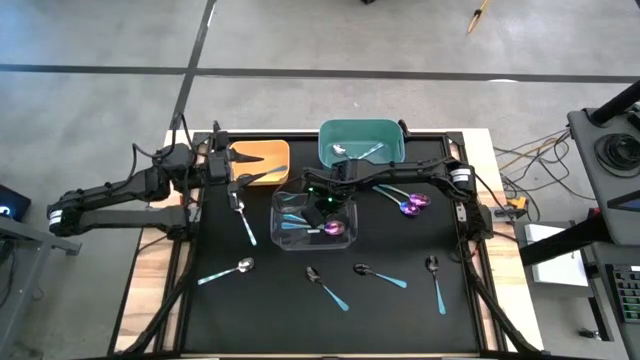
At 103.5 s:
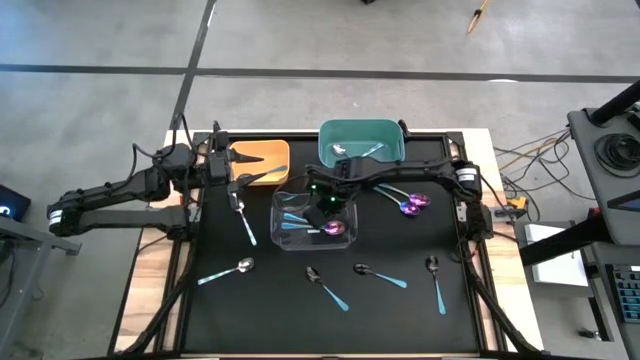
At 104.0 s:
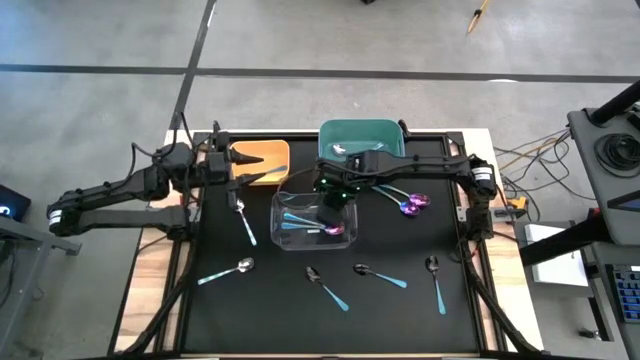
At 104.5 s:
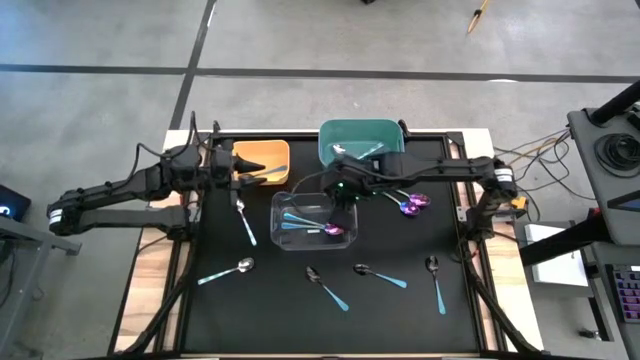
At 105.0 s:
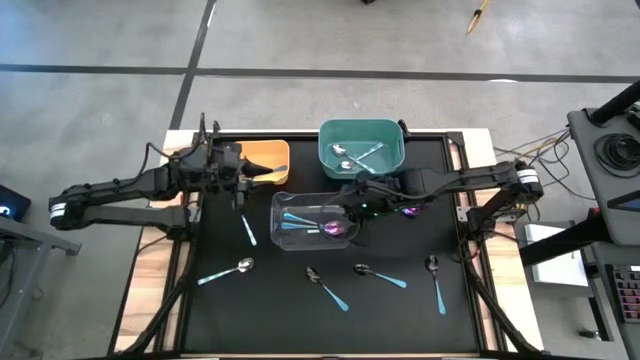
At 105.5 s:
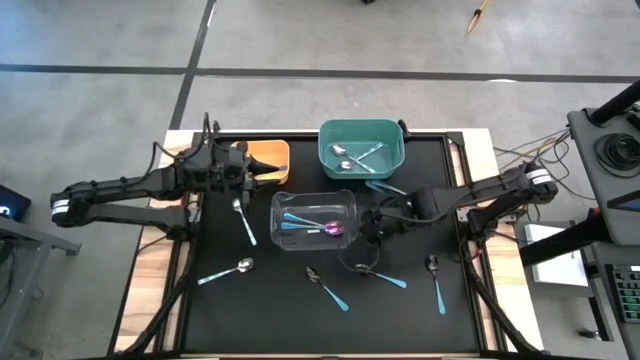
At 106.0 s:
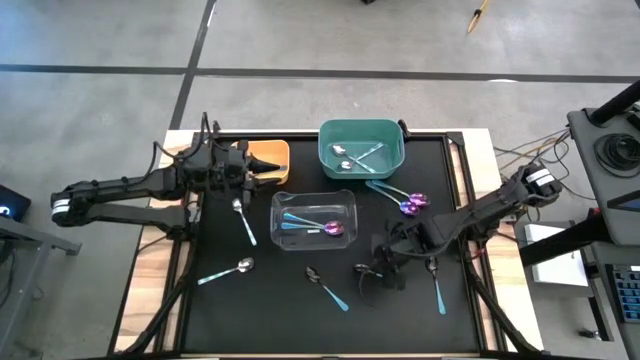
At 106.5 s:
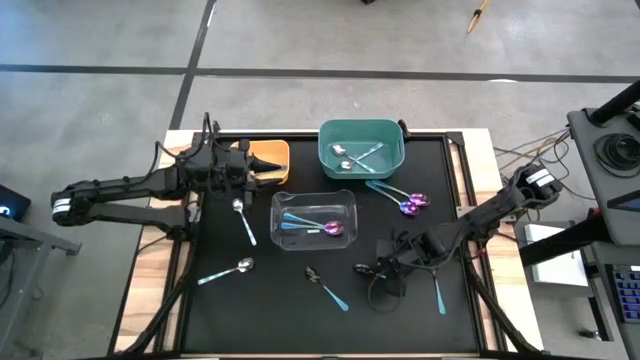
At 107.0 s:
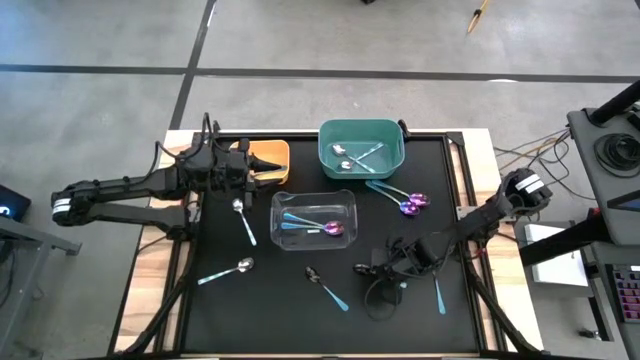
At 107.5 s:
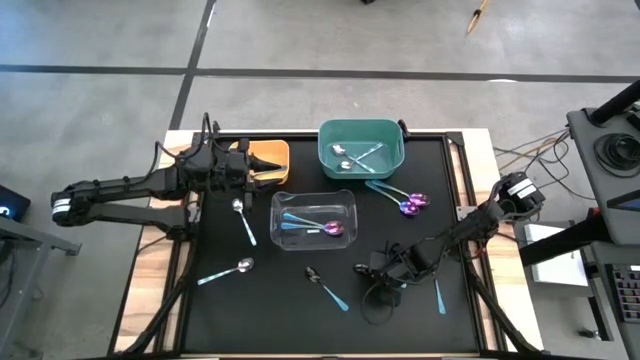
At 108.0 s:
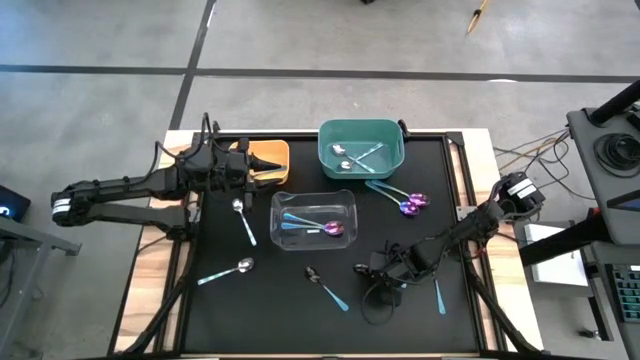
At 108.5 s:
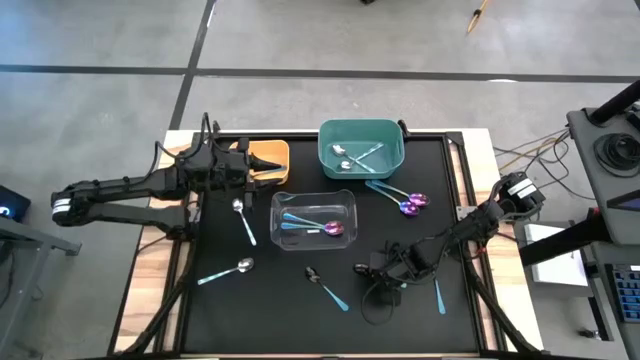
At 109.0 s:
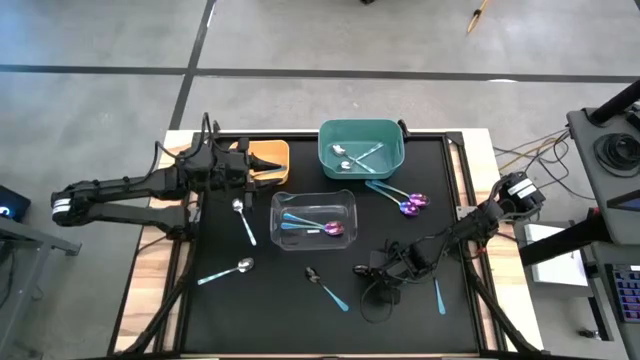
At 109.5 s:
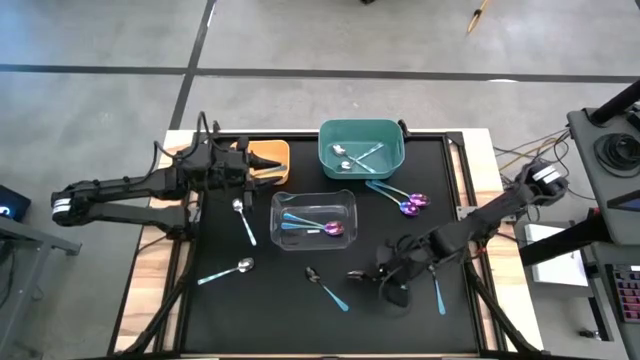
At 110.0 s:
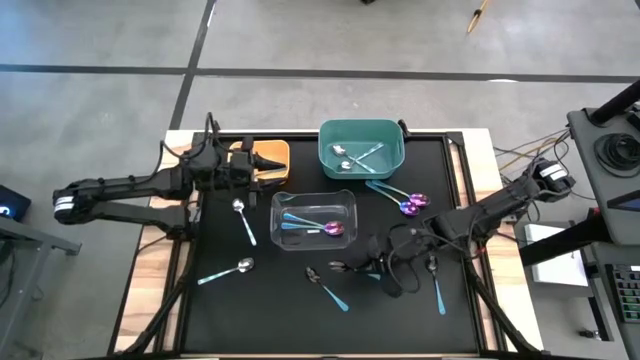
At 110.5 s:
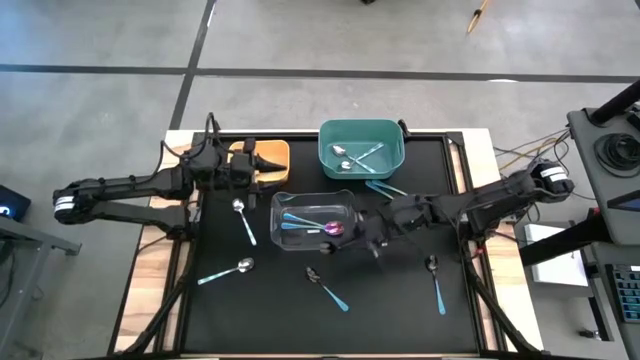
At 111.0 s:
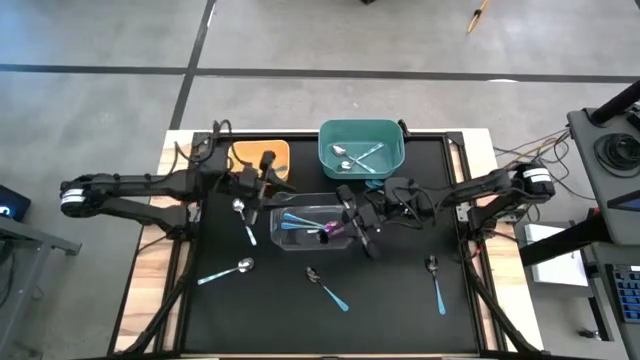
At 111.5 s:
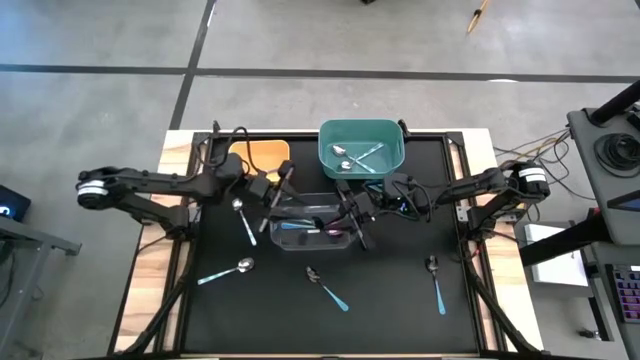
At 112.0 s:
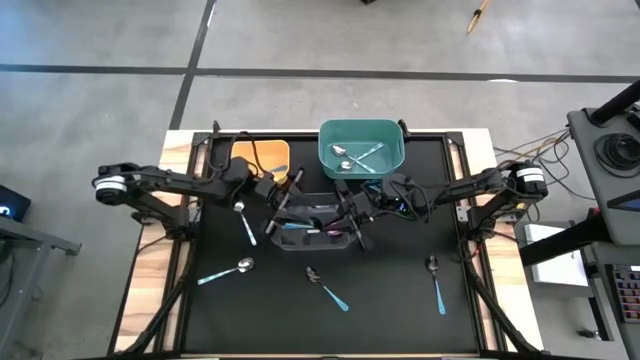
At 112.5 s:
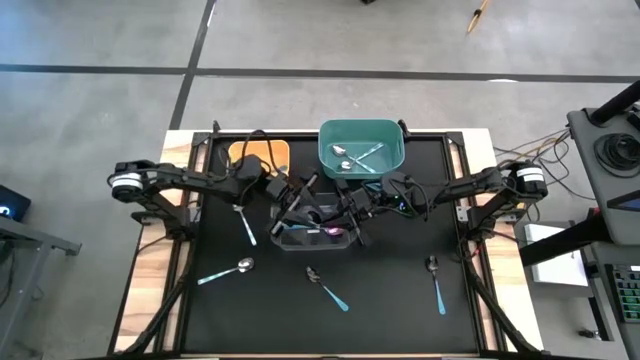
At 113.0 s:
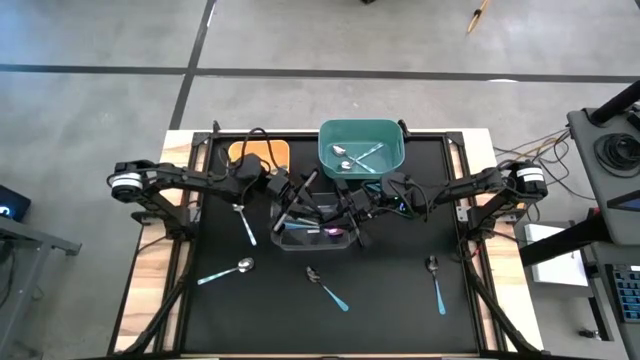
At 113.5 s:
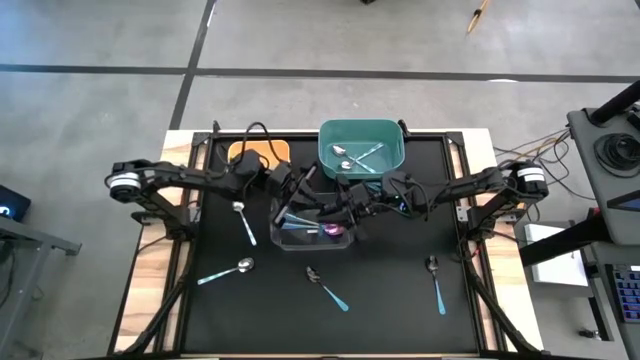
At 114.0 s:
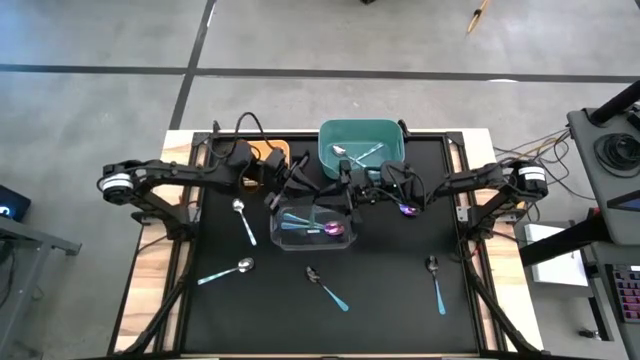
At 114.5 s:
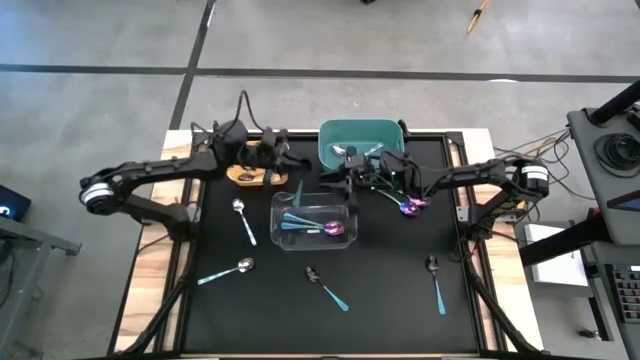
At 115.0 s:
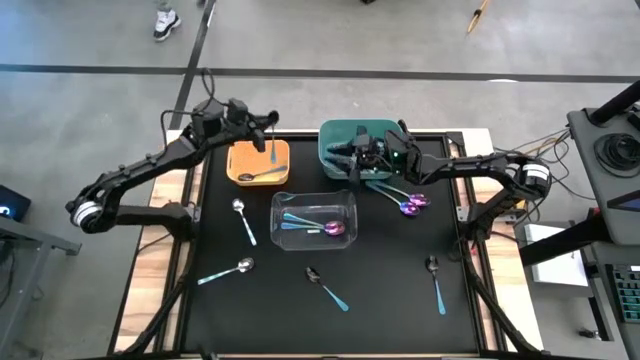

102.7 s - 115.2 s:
Task: Sort silverware by color (type)
Put the blue spoon into the yellow bin

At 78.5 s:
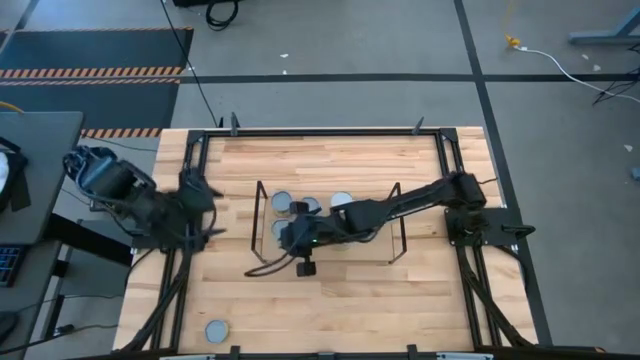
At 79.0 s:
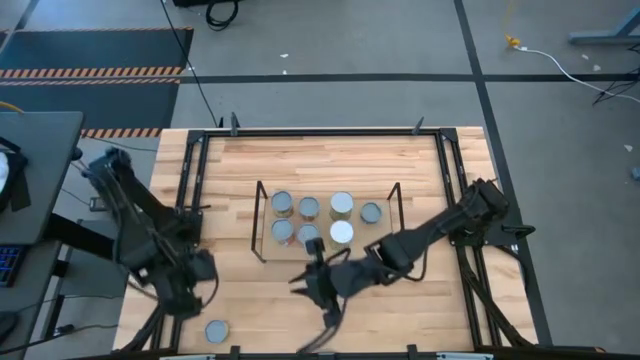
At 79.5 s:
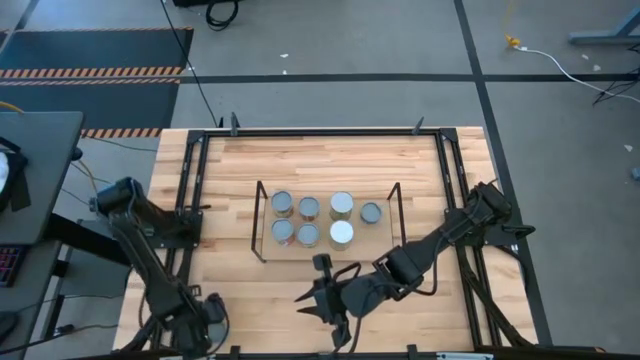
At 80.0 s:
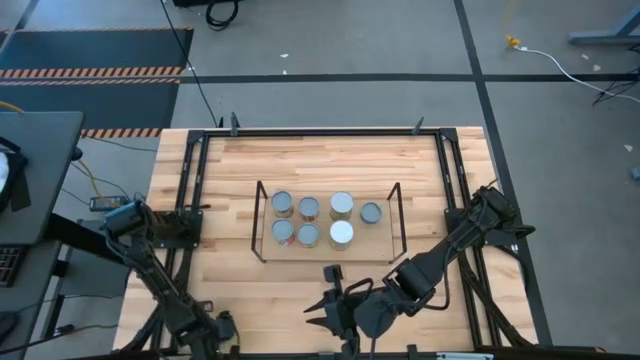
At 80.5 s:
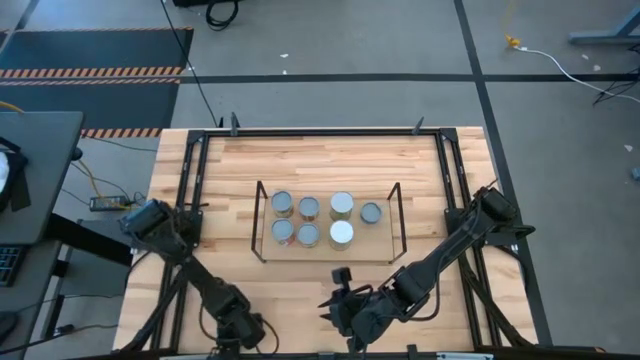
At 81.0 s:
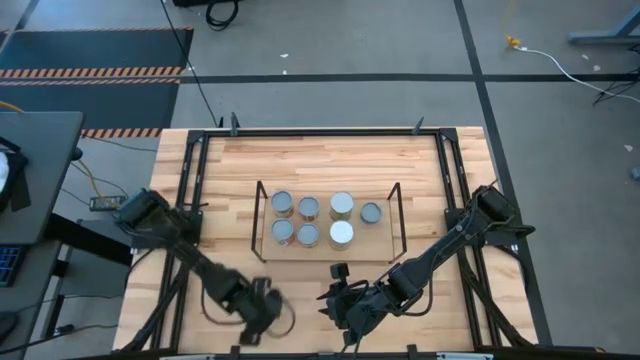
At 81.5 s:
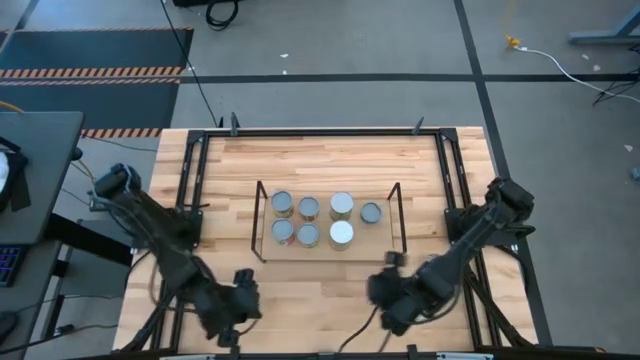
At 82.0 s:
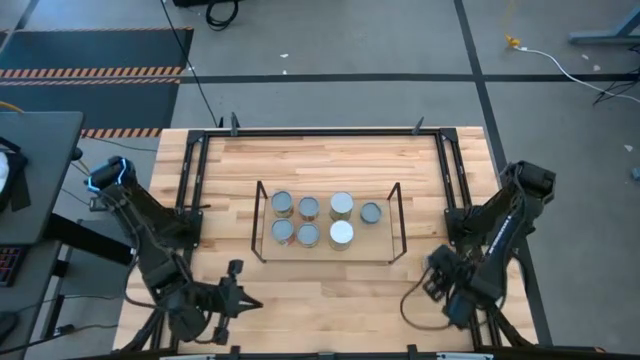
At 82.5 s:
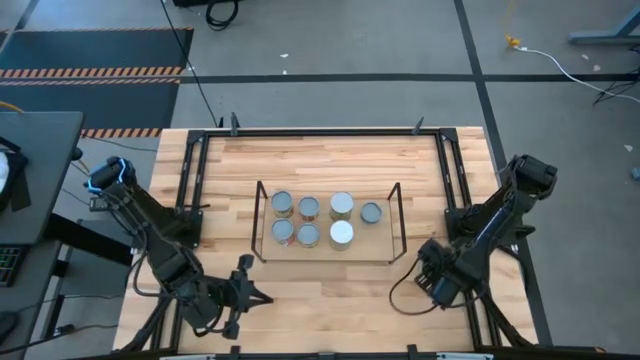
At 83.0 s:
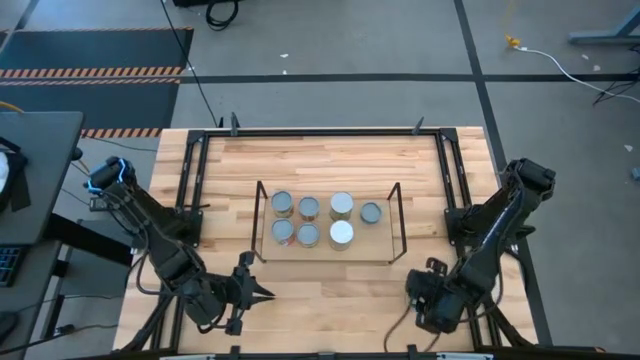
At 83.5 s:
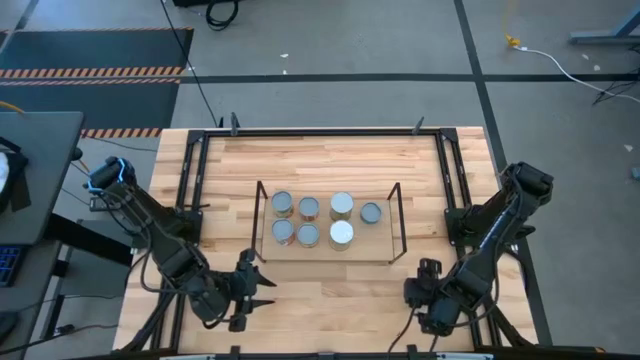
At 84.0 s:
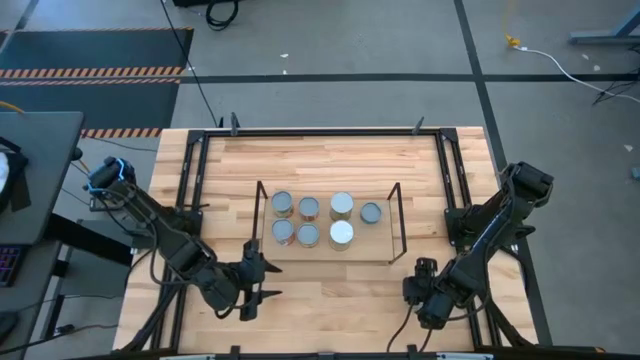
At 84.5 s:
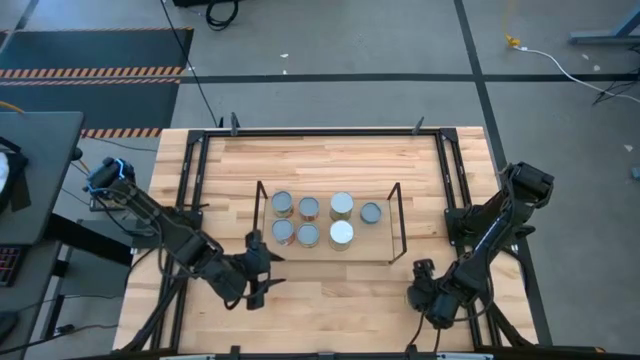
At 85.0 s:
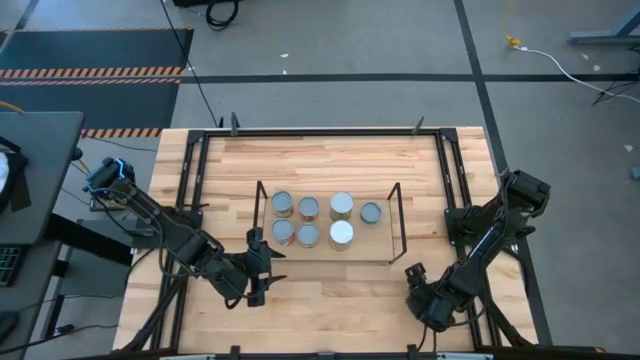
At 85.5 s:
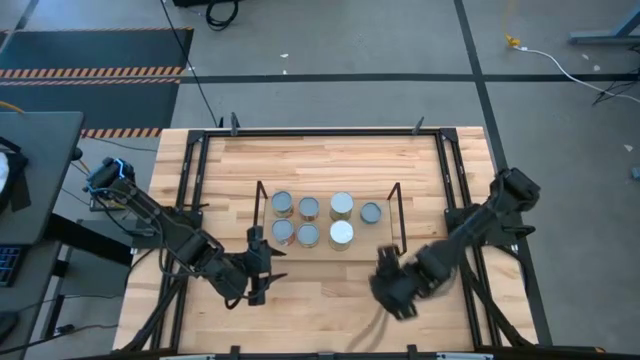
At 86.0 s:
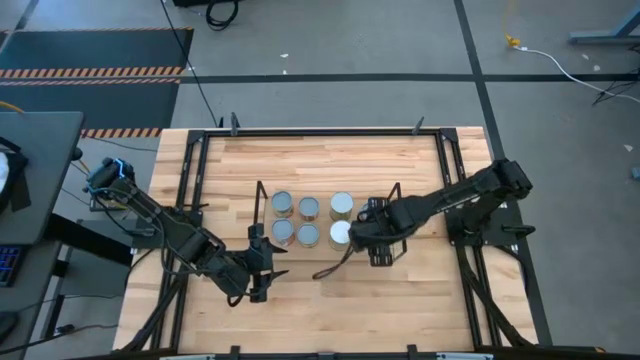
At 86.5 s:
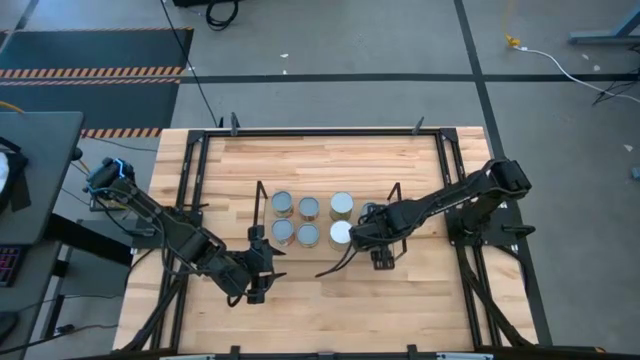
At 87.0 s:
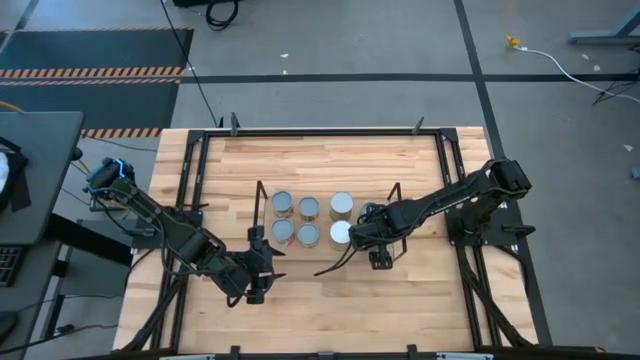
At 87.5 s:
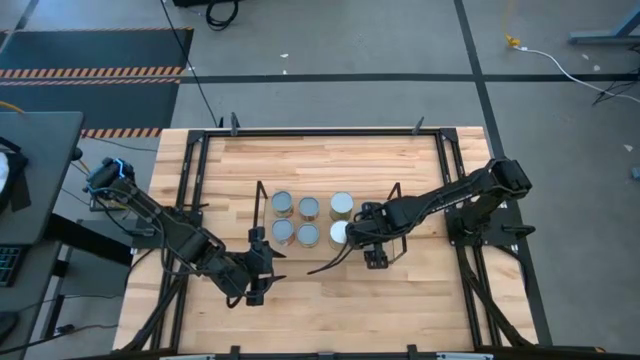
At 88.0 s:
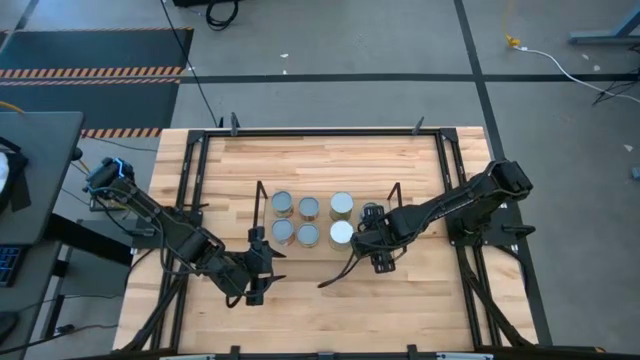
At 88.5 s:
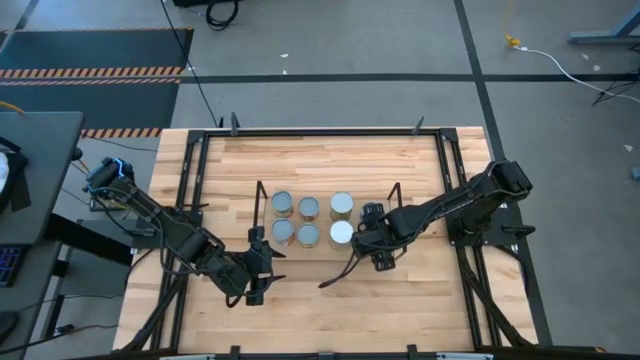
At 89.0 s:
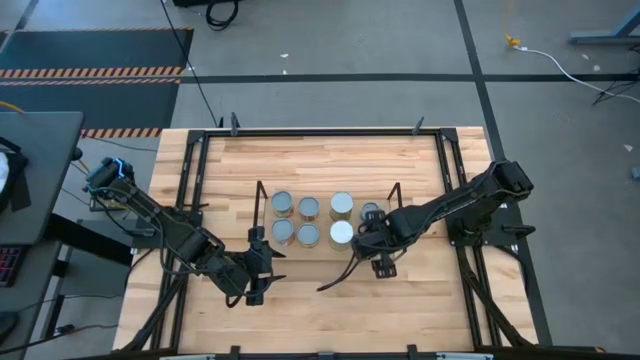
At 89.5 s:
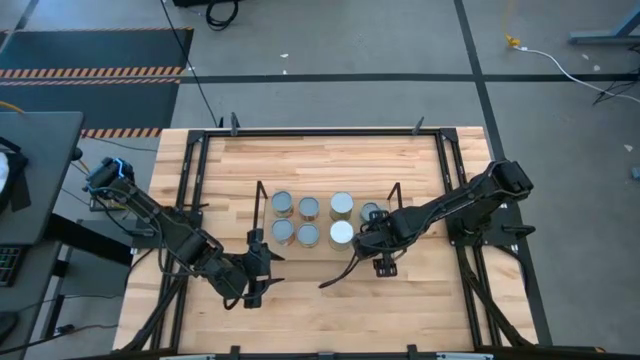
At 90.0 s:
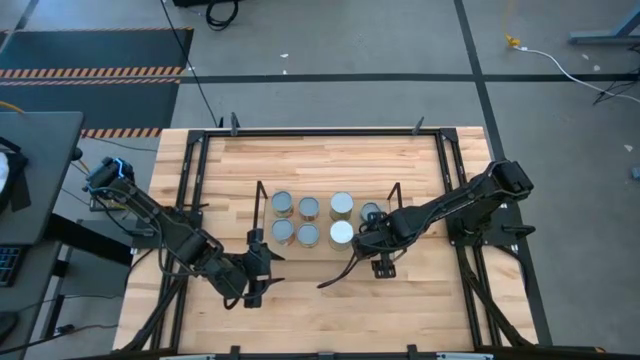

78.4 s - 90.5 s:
Task: Pick and place cans onto a shelf
Put the yellow can on the shelf aligned with the blue tuna can
